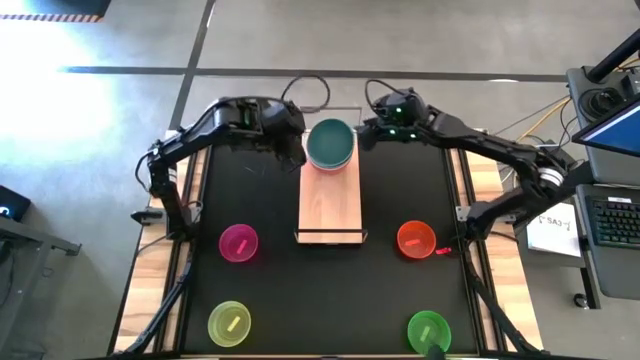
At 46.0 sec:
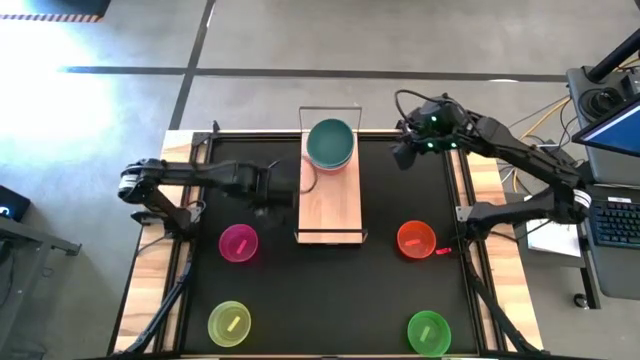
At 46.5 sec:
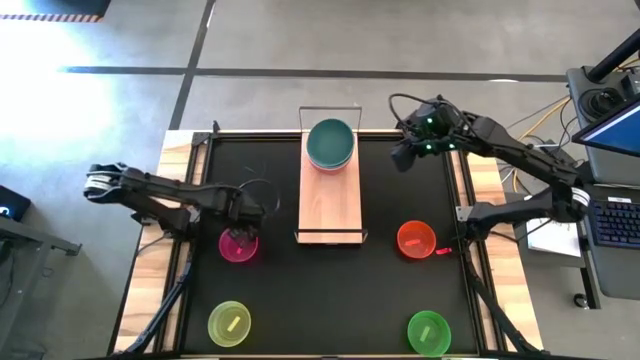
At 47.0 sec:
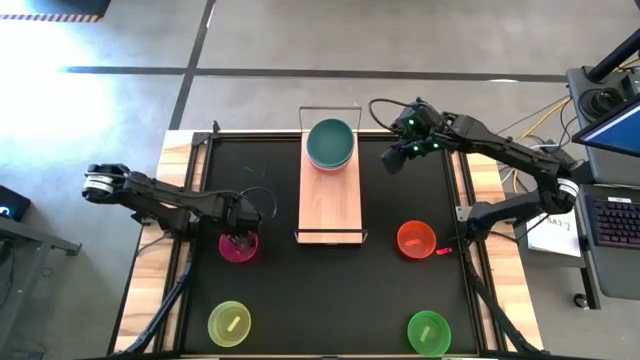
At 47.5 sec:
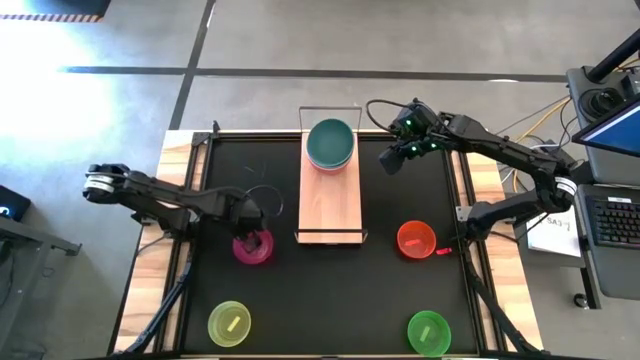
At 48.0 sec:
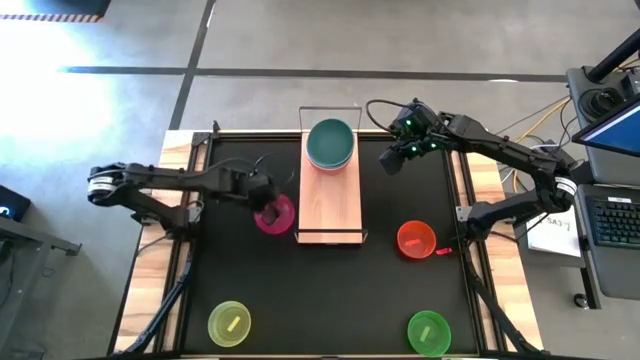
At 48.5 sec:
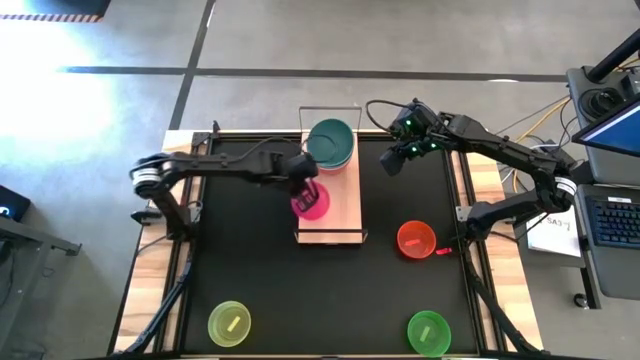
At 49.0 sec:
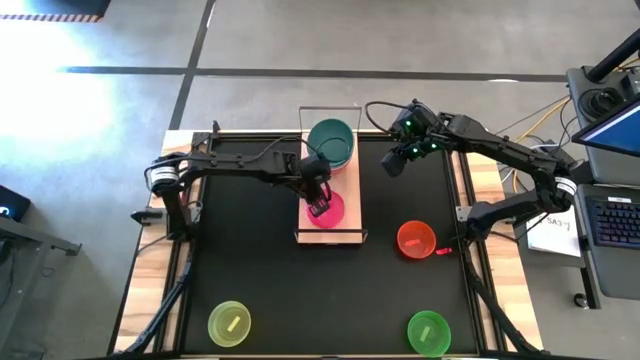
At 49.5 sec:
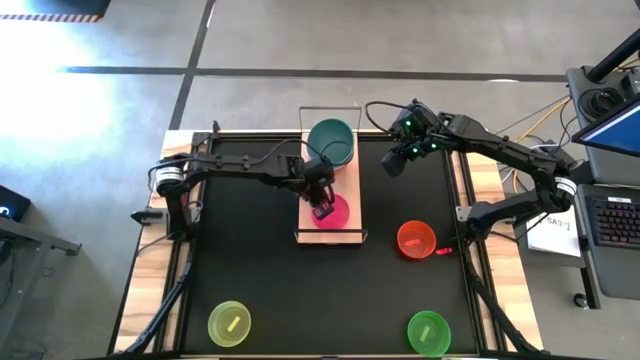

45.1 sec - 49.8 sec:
Task: Place and stack bowls onto a shelf
Put the small pink bowl on the shelf

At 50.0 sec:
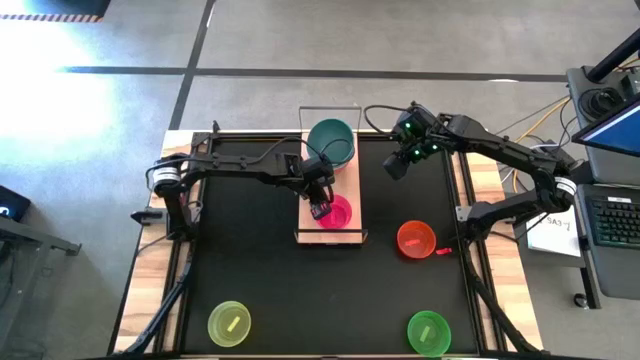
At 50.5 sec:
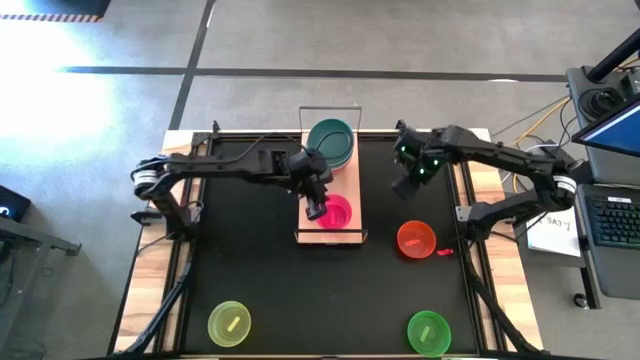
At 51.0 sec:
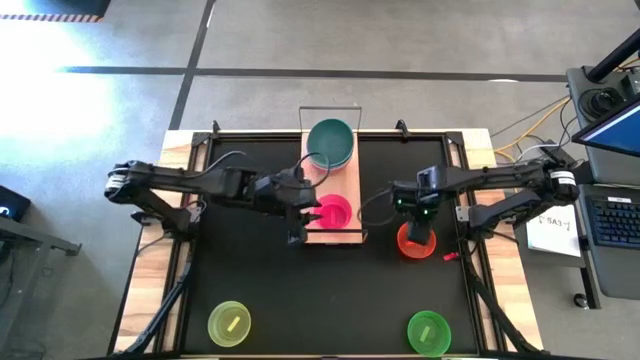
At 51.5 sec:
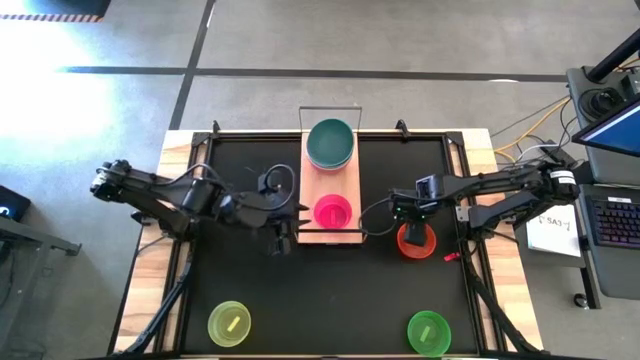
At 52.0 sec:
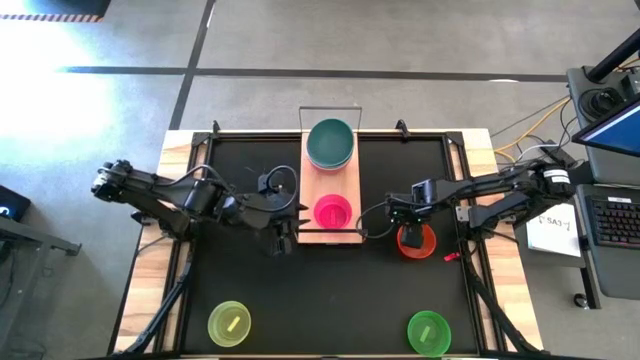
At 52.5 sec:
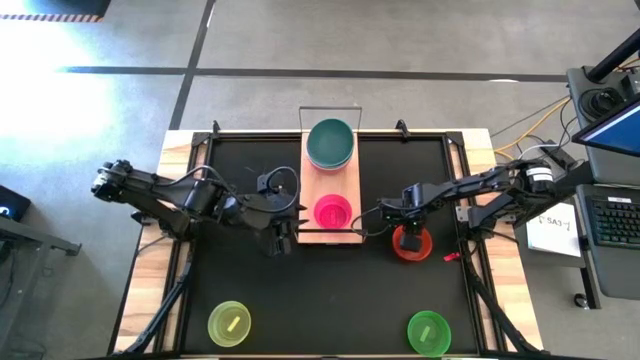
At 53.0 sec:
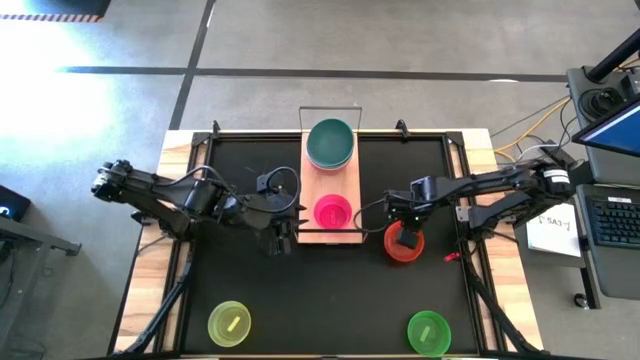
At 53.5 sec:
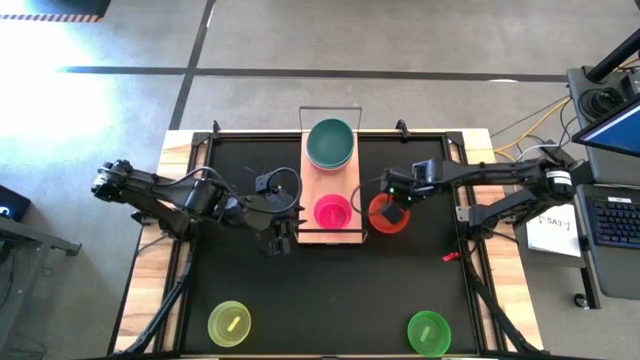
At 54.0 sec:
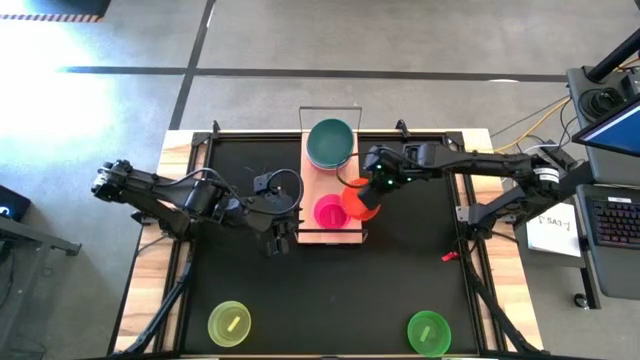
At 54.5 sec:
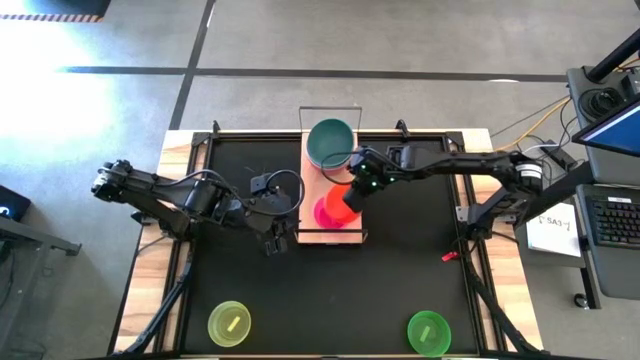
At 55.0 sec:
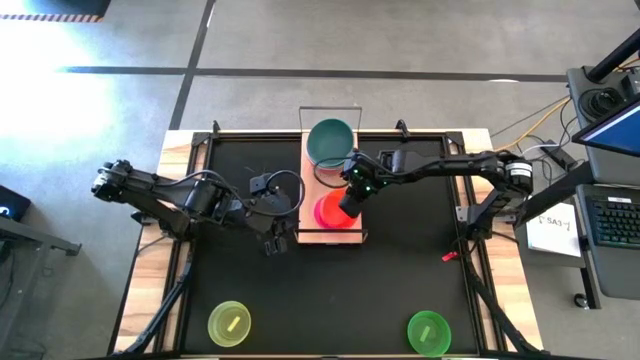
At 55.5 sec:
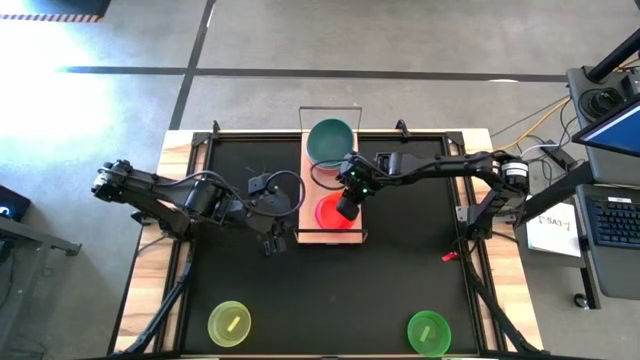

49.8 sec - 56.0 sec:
Stack the small orange bowl on top of the small pink bowl on the shelf

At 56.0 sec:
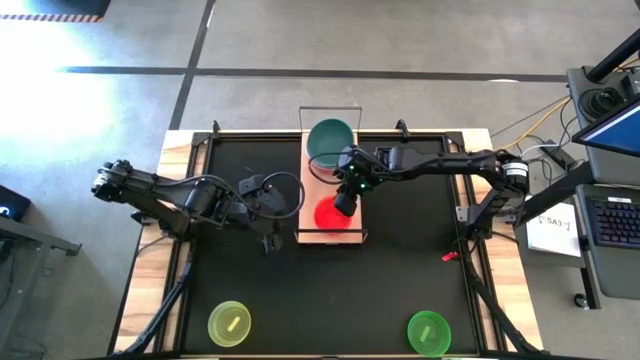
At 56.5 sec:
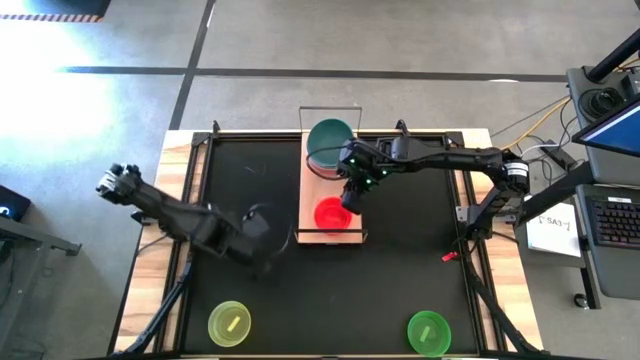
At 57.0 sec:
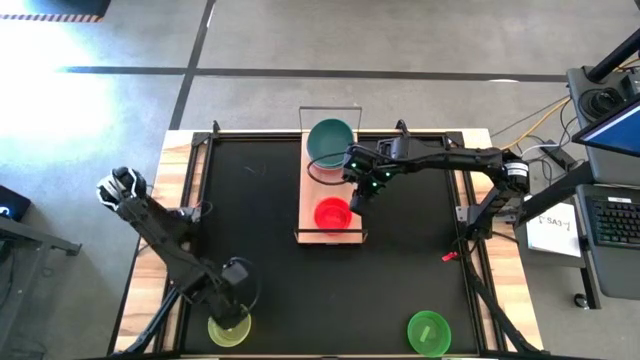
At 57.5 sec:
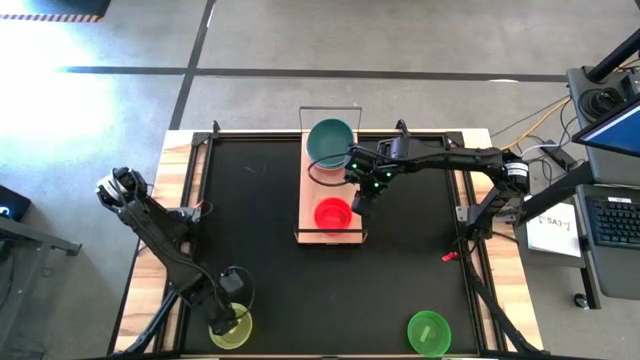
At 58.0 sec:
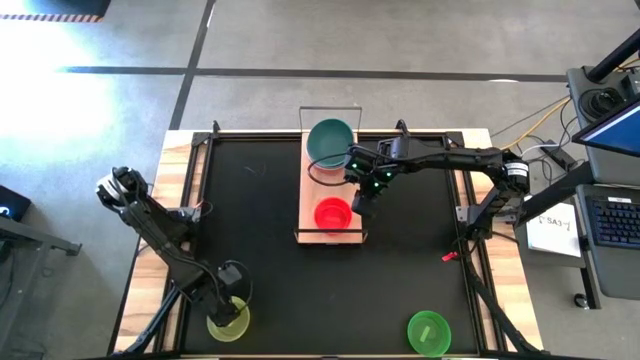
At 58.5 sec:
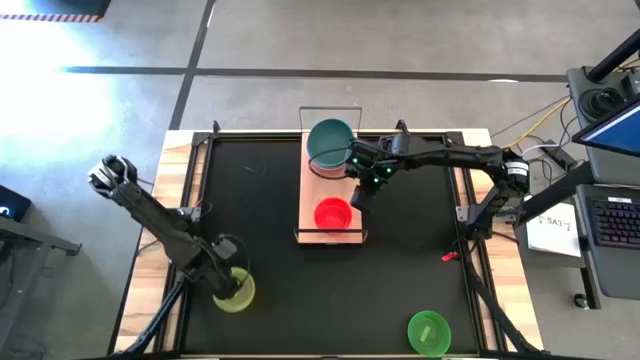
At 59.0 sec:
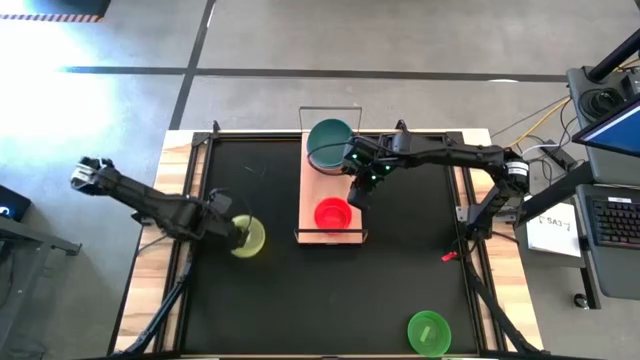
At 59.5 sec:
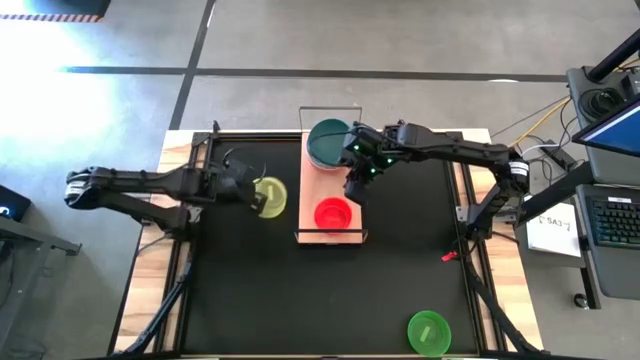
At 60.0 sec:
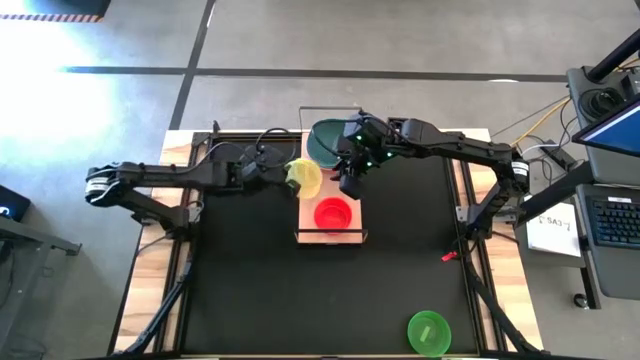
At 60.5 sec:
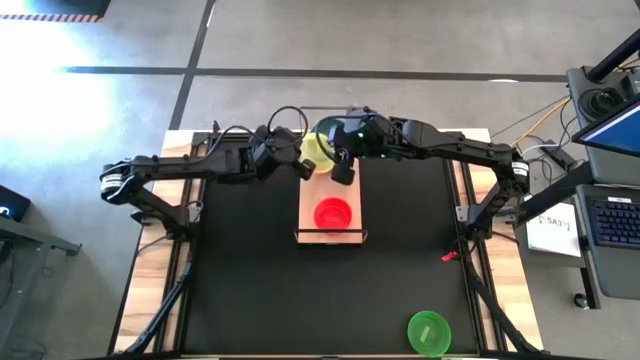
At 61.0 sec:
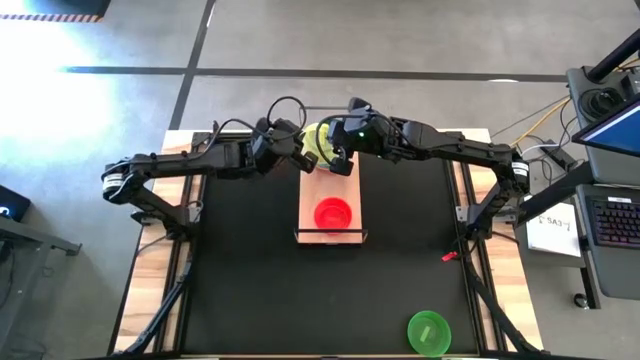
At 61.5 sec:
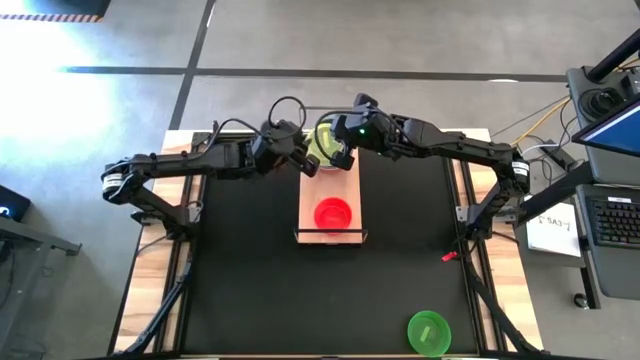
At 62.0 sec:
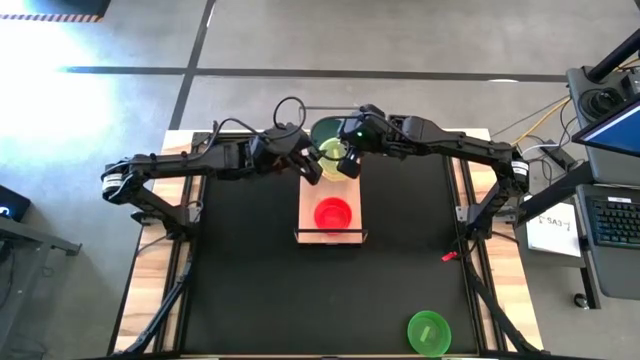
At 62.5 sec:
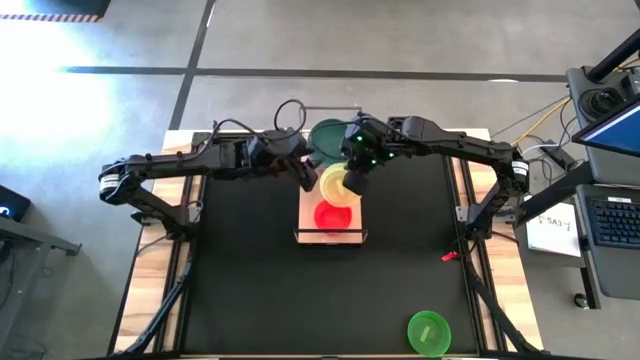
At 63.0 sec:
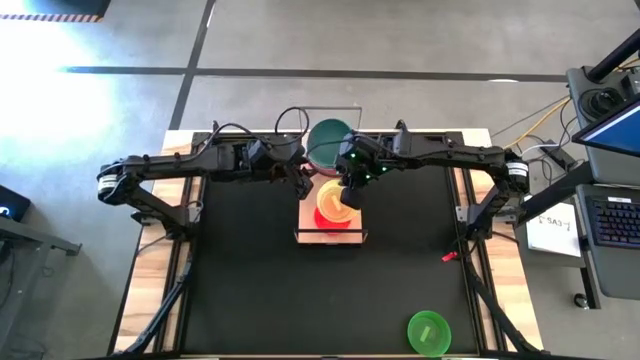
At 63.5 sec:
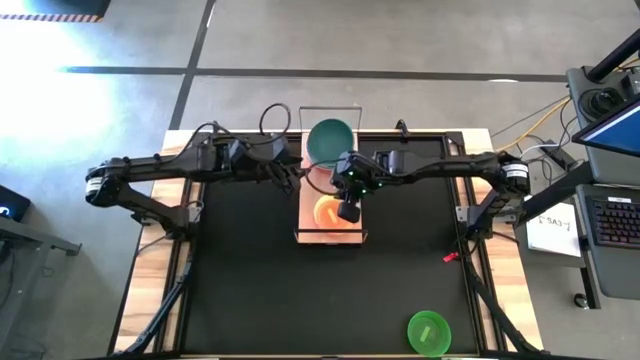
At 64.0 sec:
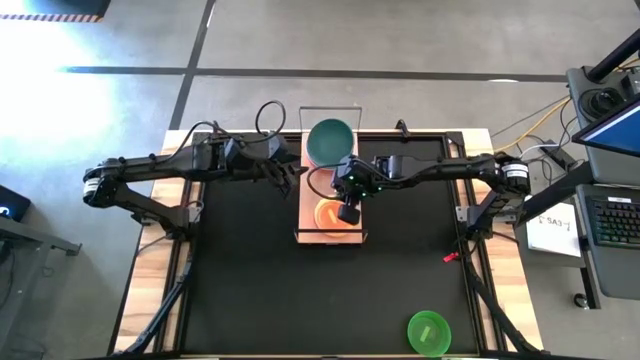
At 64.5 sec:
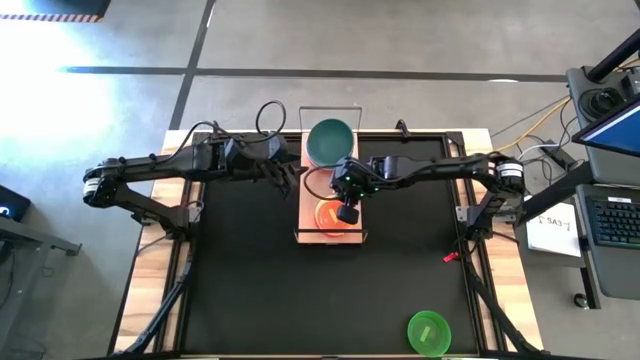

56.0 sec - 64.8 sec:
Stack the small yellow bowl on top of the small orange bowl on the shelf
